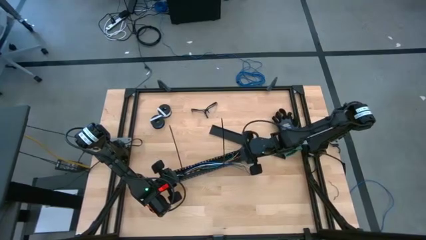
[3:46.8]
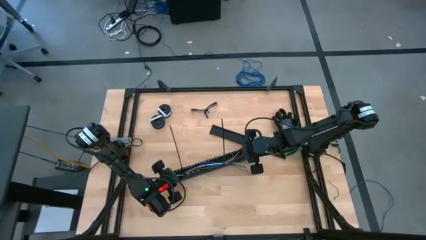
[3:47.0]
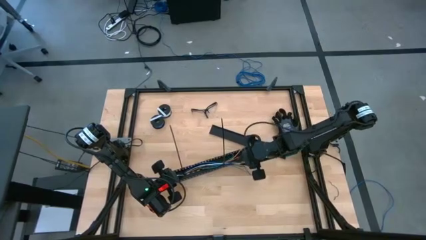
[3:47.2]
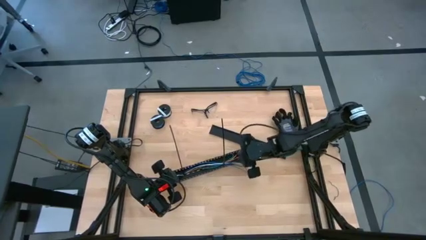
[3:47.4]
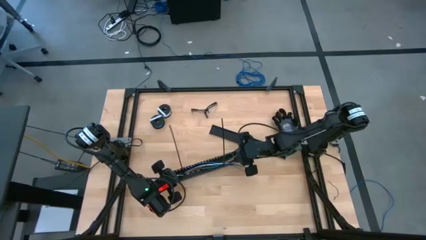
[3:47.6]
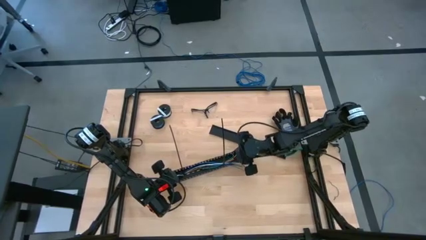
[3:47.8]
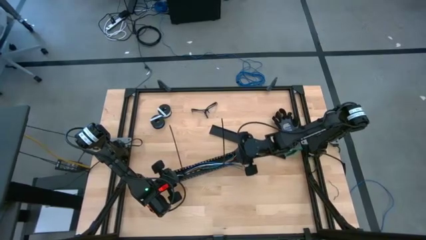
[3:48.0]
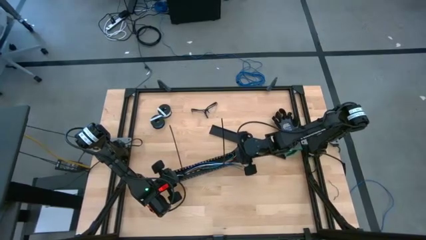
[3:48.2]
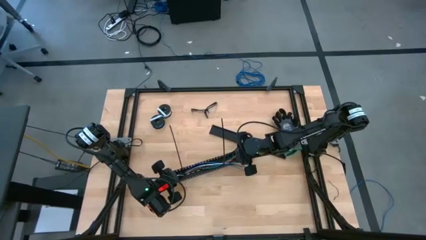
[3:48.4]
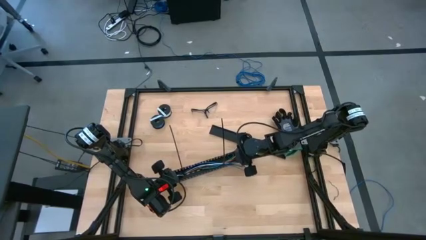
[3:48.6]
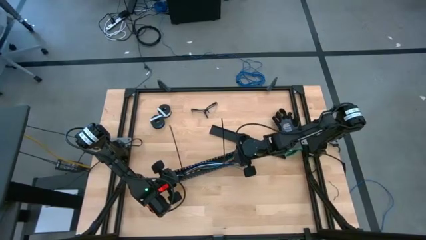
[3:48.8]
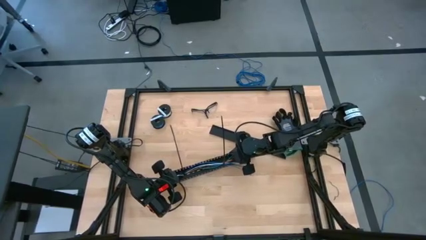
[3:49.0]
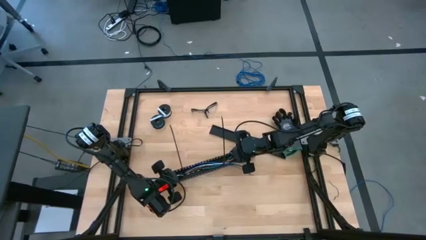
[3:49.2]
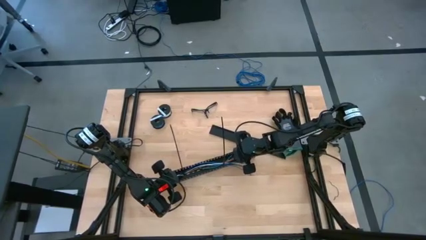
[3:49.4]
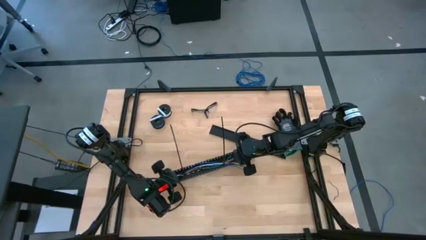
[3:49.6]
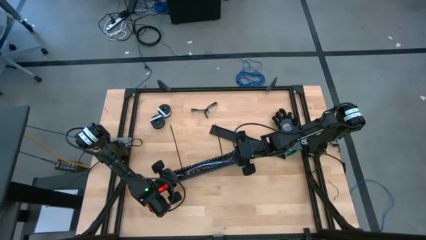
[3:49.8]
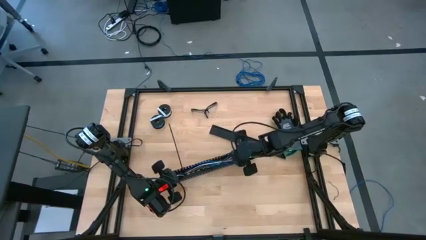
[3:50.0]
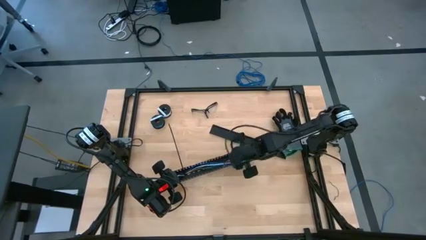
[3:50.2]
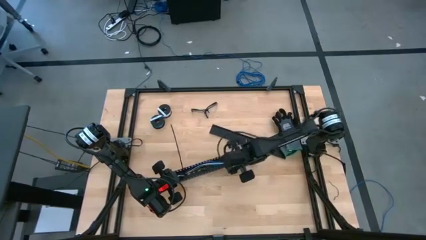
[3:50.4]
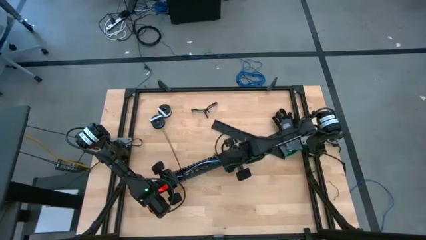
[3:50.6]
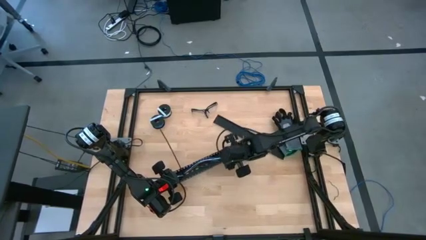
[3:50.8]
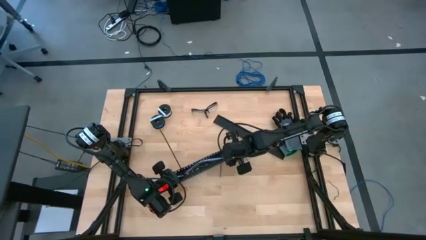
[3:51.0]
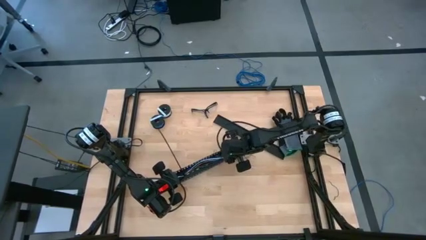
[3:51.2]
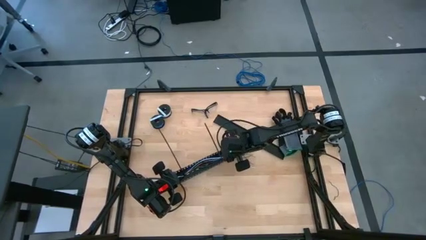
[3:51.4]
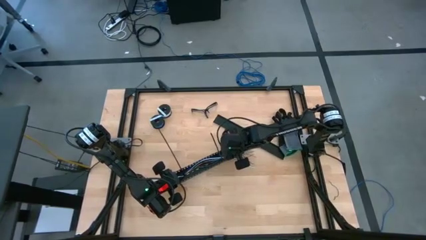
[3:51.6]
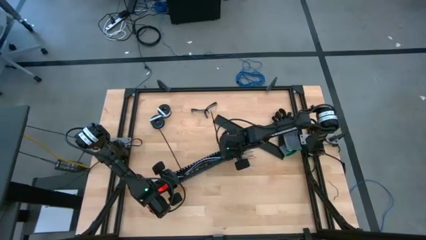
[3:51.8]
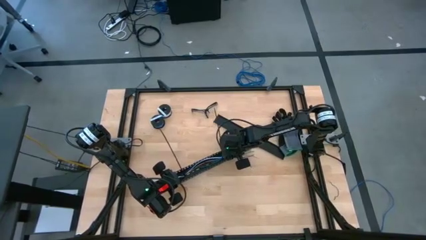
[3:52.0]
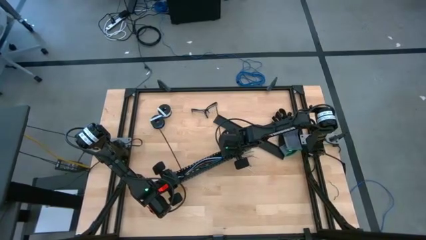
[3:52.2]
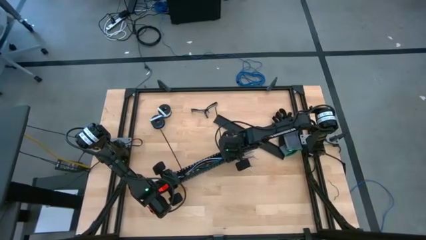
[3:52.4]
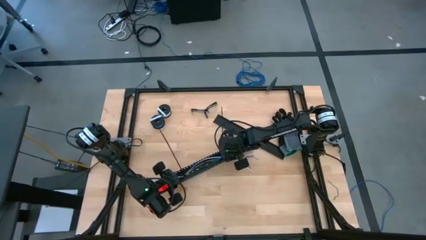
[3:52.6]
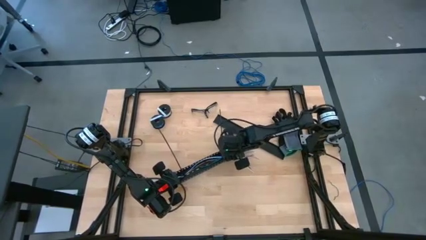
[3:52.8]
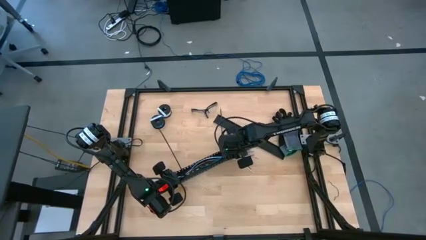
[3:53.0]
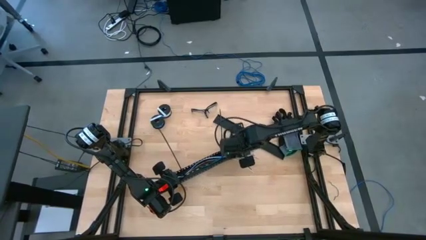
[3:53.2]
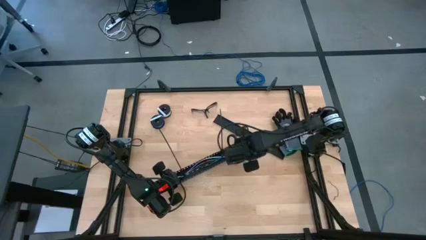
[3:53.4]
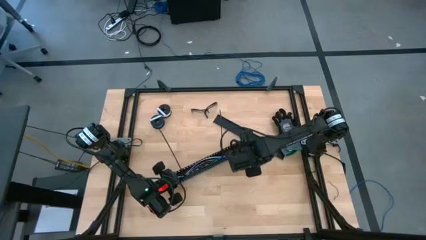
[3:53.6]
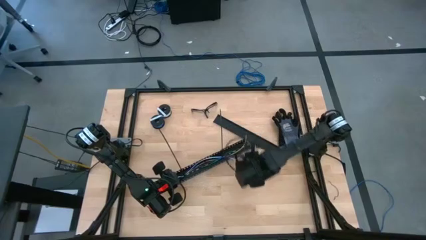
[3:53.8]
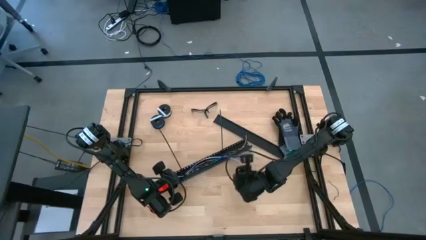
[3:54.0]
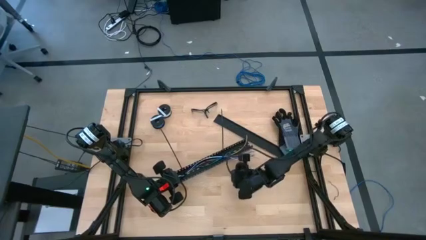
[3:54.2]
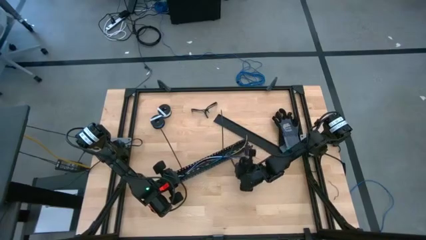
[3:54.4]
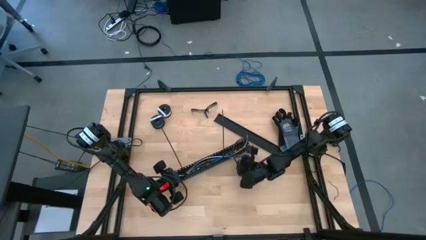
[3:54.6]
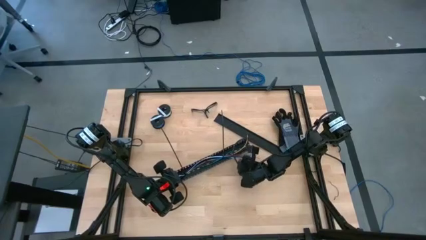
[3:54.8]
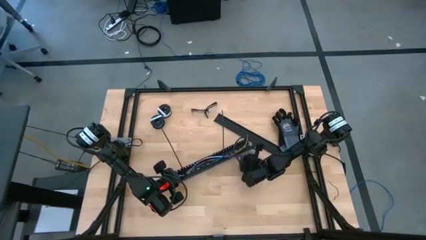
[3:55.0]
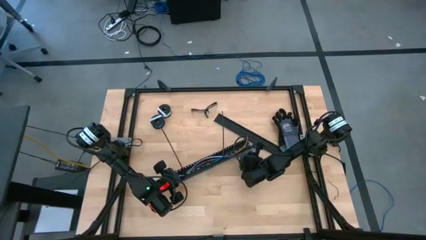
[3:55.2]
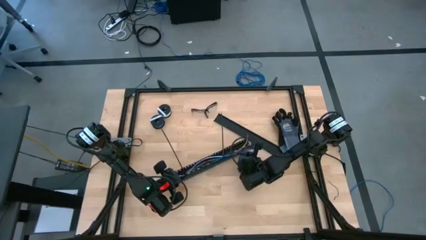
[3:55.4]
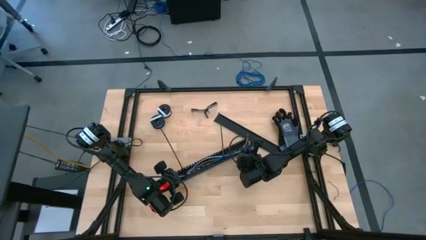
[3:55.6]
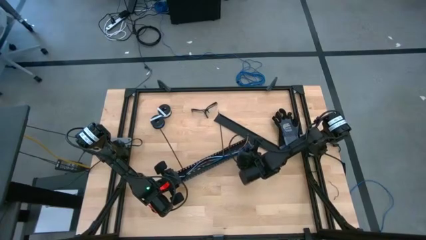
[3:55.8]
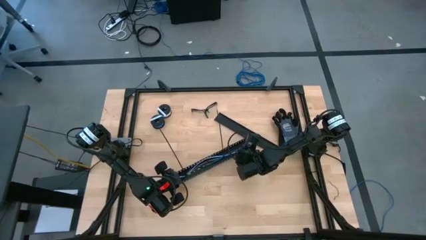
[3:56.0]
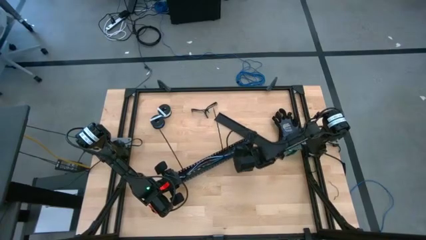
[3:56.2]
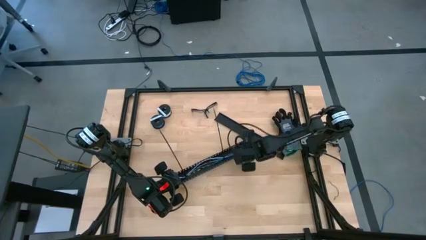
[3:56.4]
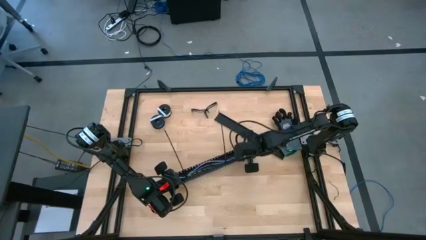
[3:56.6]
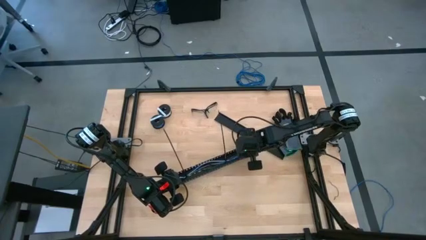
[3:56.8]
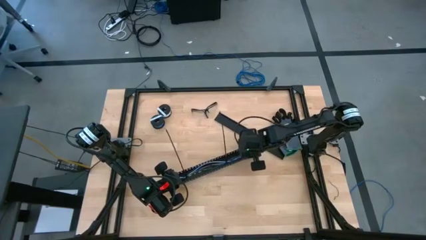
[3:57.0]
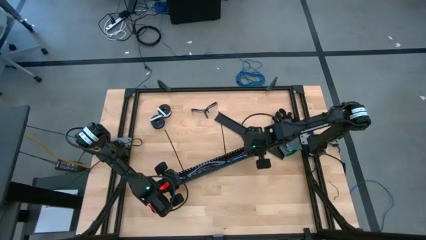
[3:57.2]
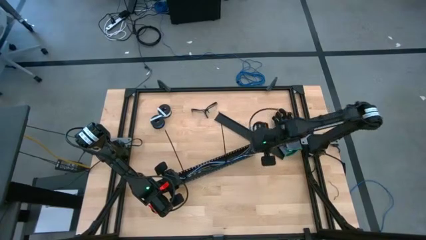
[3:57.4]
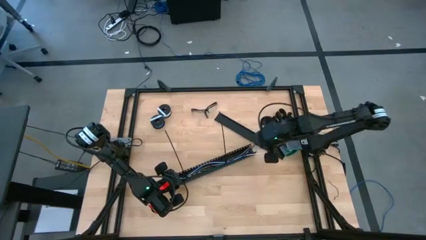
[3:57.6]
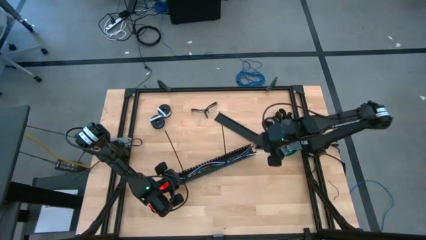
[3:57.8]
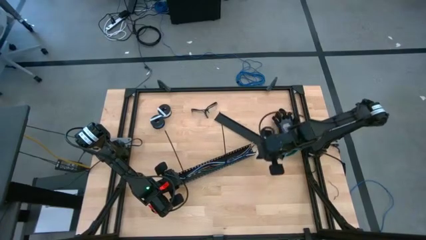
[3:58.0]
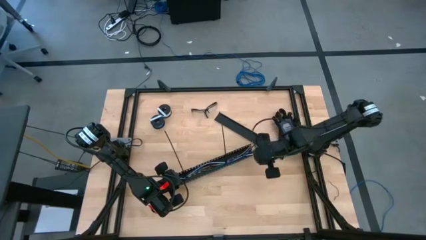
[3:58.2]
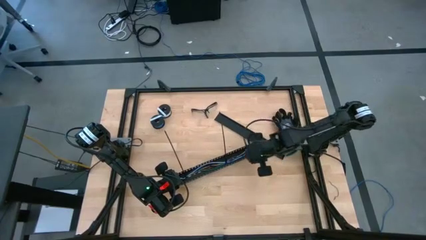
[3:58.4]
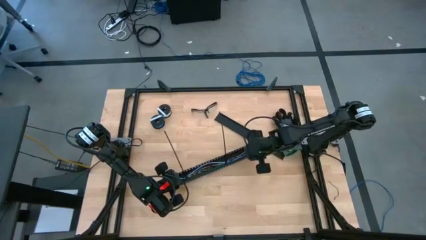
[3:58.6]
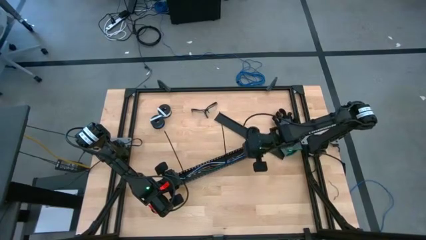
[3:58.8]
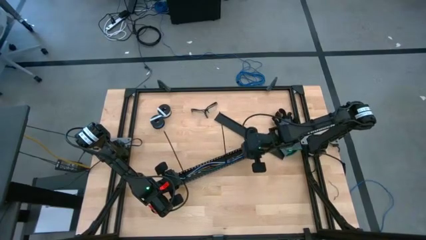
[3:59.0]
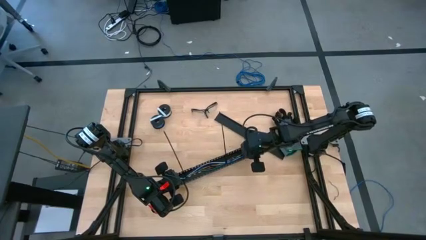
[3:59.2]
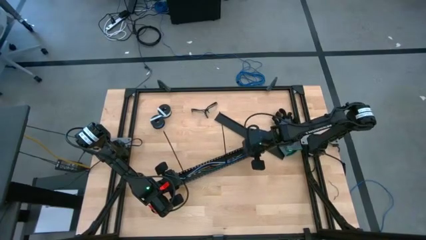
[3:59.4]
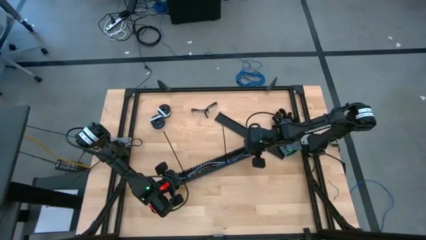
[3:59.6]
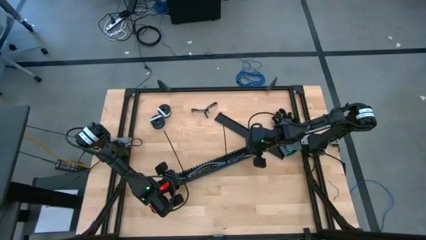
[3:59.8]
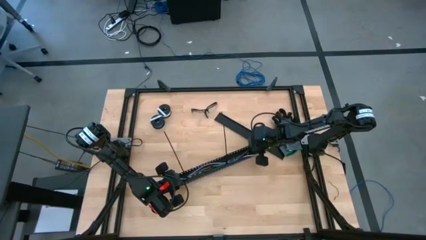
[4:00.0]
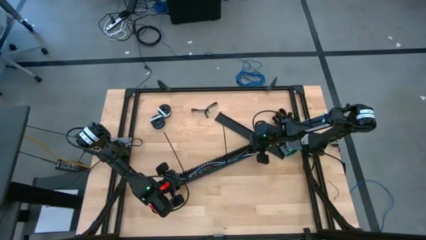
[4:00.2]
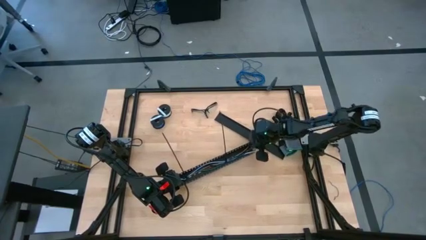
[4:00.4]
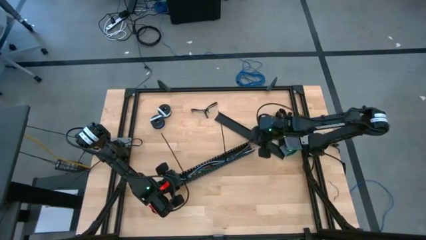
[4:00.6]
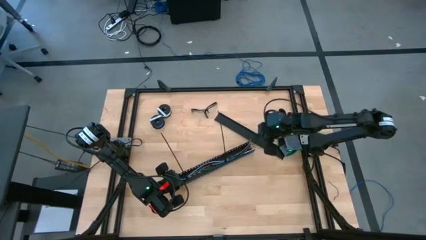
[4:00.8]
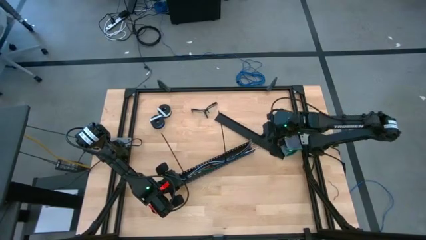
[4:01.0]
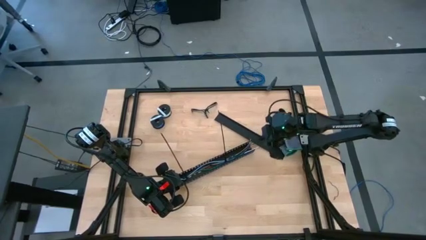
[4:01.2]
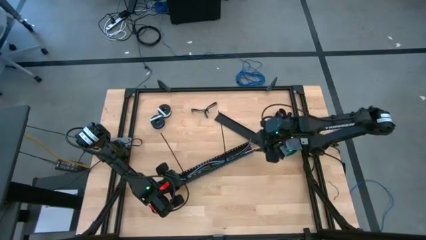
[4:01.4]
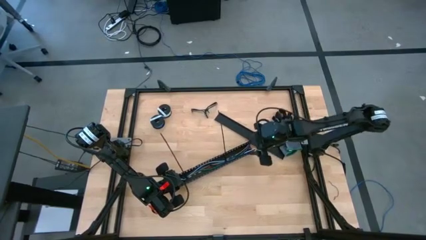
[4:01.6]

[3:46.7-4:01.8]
Task: Ziptie cables
Put the wrapped cables into the black cable duct

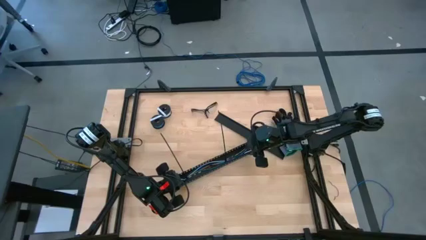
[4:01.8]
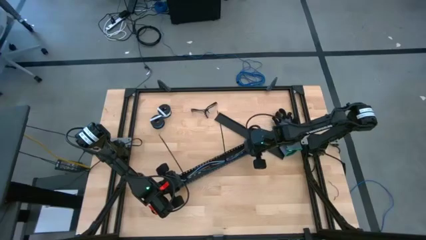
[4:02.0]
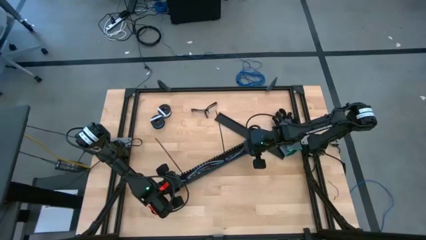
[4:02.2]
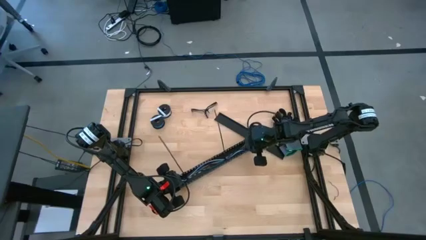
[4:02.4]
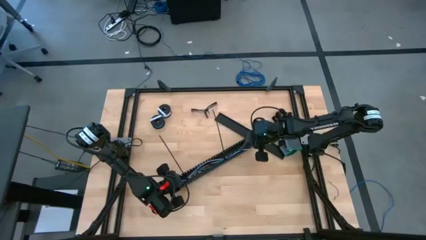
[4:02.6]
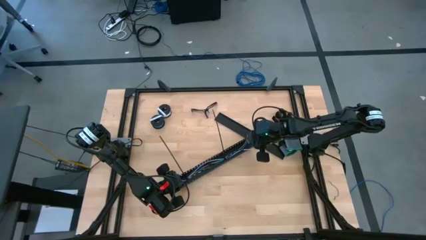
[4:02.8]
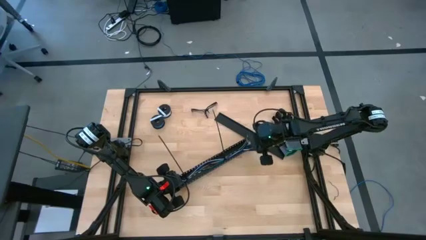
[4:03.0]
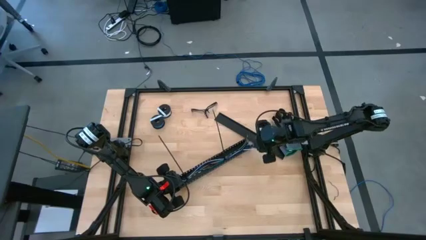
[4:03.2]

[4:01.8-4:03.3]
Put the wrapped cables into the black cable duct
